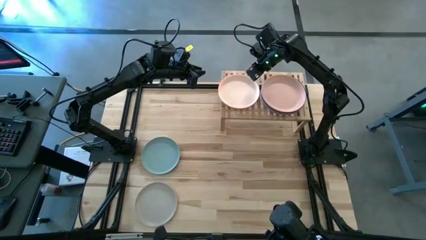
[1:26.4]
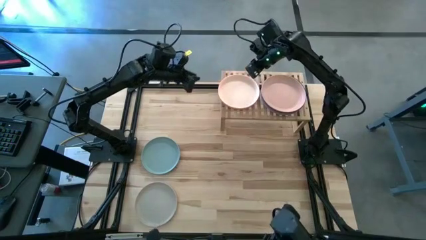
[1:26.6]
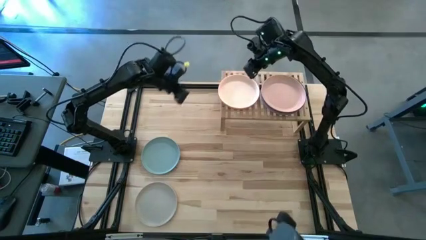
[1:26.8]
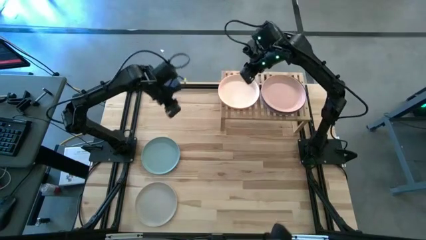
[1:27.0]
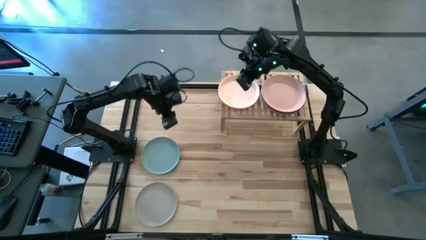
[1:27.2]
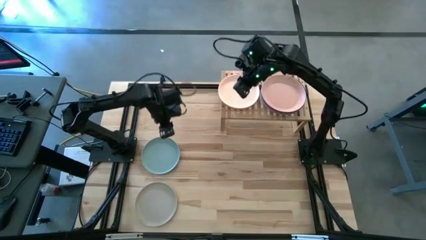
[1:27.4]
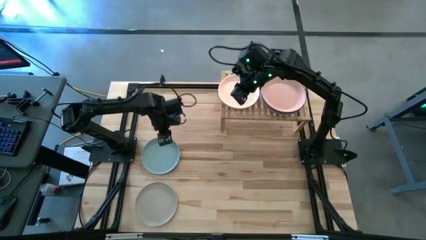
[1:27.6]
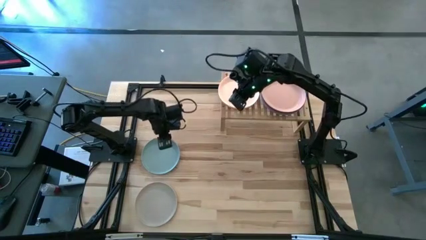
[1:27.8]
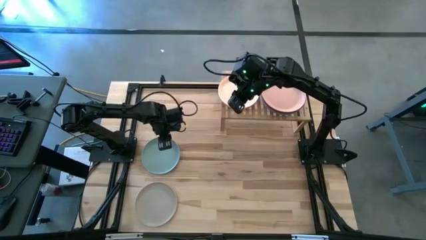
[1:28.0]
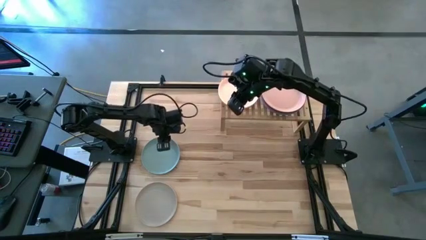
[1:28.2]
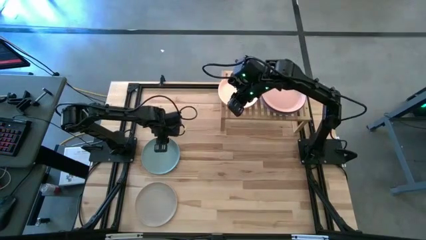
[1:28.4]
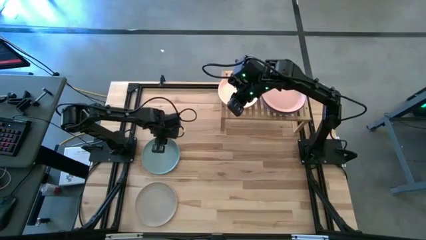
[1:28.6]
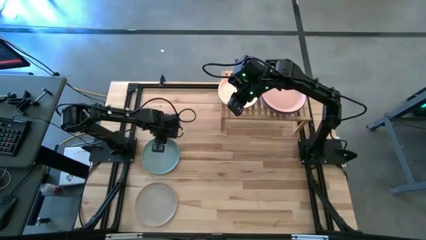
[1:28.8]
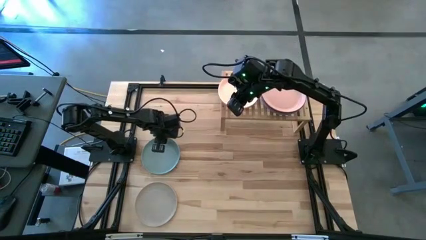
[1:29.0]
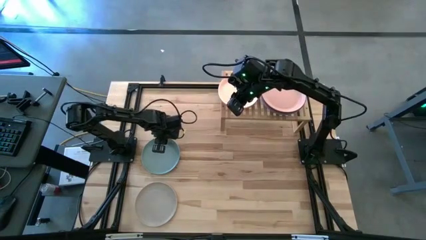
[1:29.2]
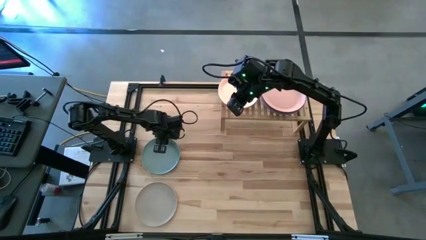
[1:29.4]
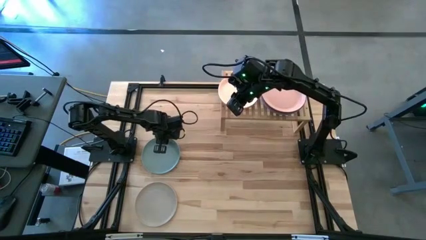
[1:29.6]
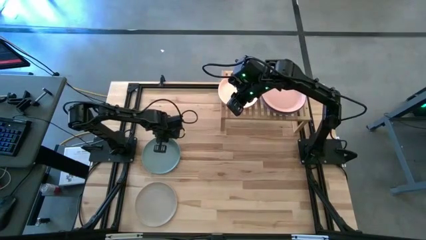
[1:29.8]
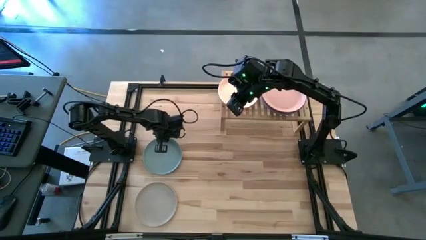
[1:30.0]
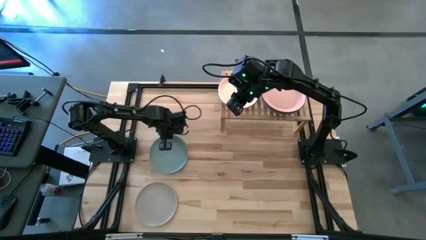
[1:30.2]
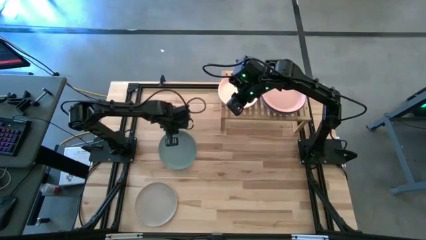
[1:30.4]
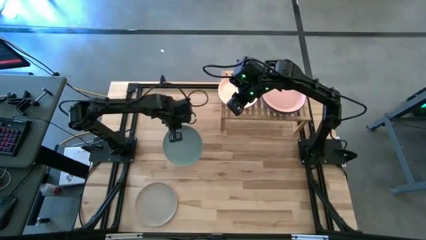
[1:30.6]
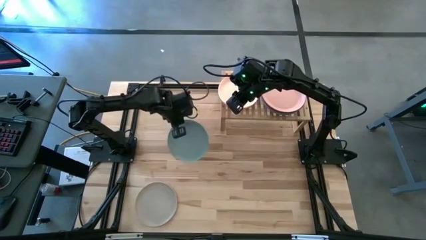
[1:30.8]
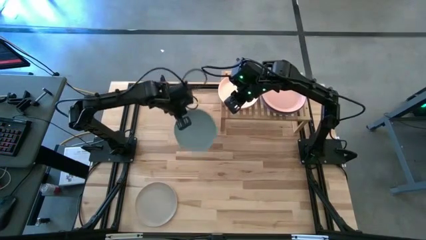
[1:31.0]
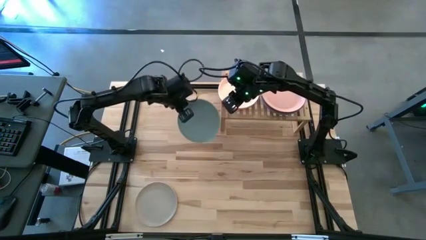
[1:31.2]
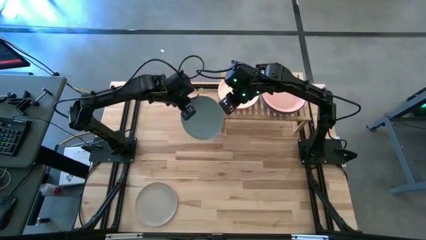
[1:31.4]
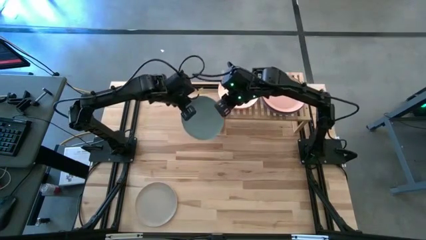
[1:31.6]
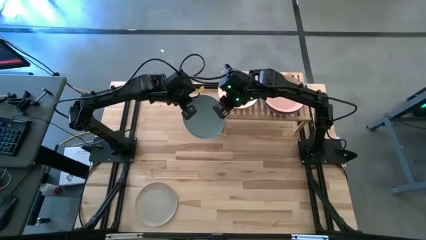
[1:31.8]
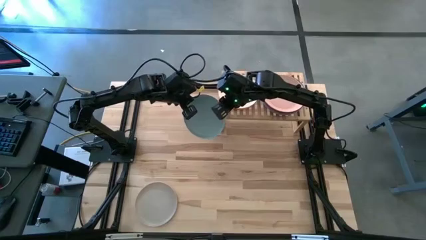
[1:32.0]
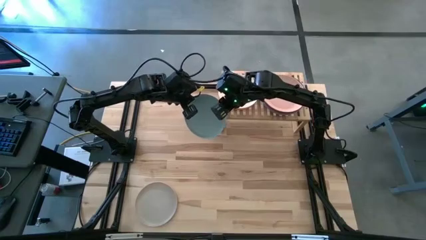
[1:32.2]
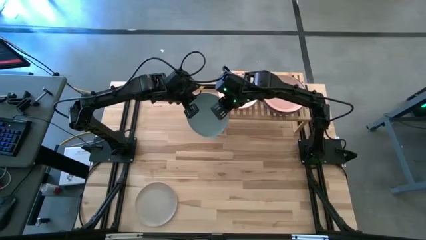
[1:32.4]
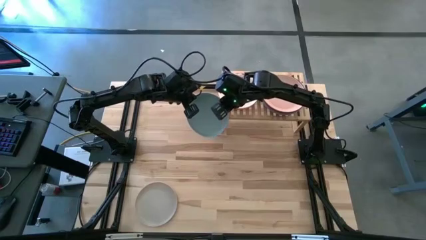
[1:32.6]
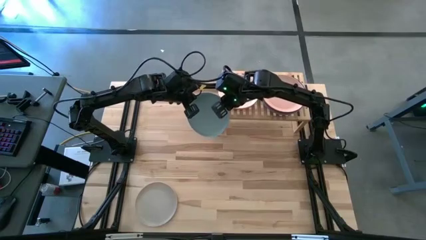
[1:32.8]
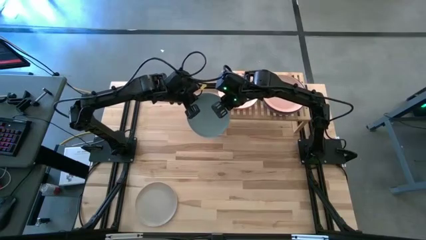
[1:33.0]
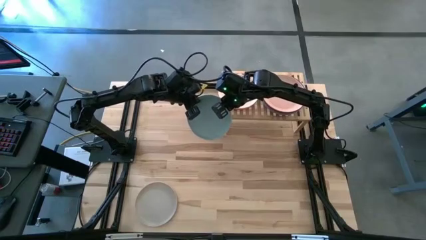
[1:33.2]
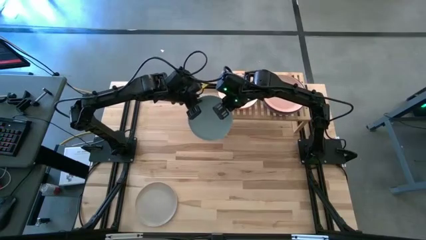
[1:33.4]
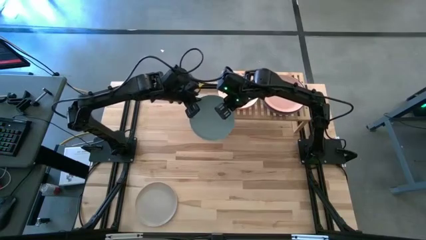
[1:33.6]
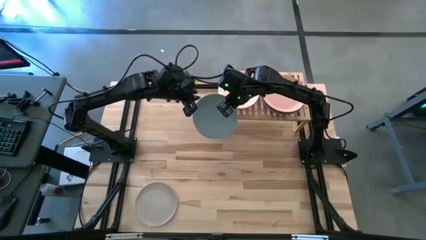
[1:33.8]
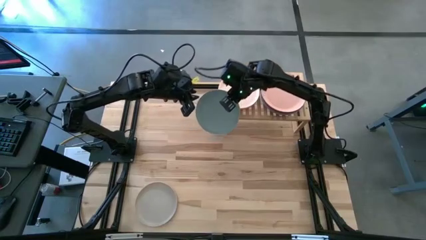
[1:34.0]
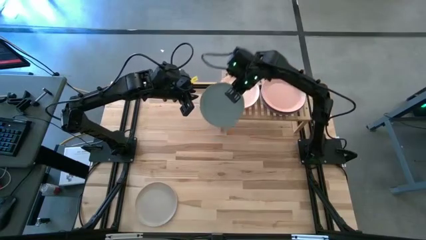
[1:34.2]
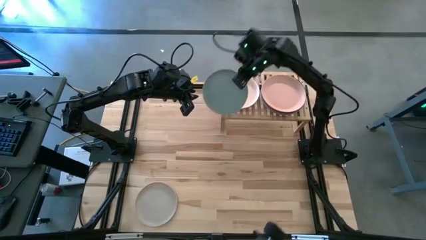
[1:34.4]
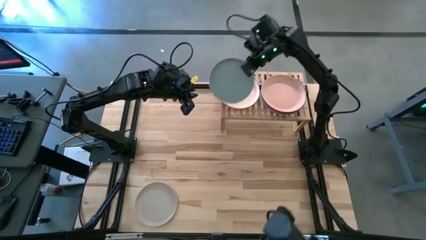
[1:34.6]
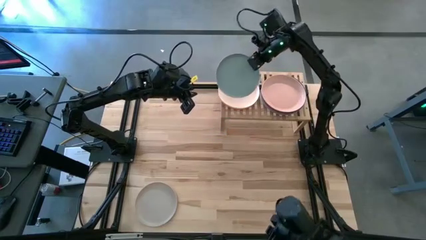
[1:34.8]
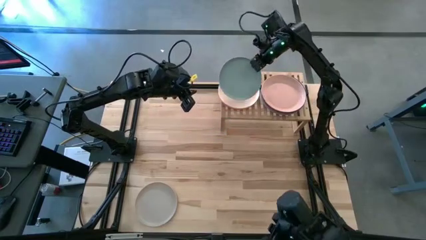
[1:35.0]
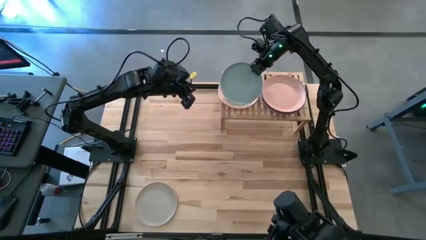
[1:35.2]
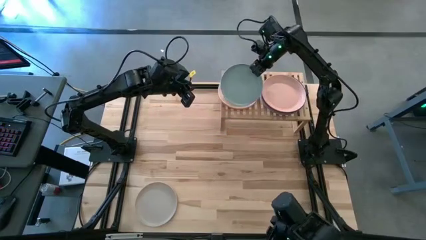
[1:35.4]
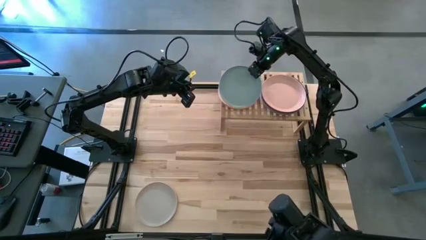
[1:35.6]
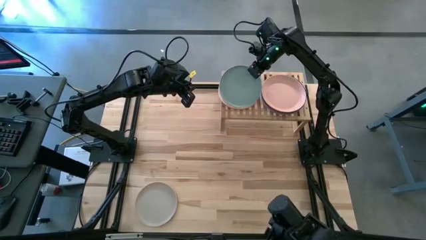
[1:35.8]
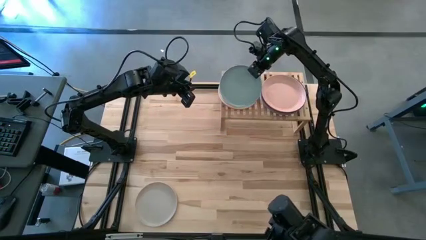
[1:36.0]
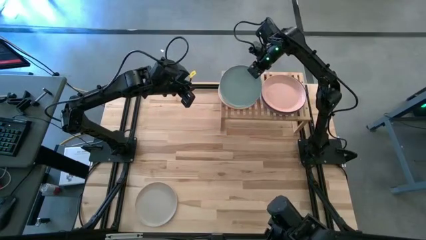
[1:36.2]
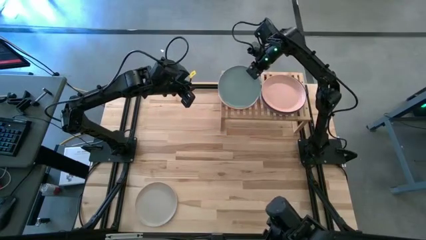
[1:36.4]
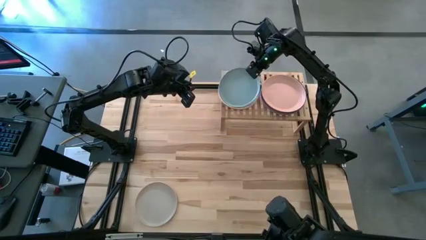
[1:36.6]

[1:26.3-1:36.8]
Task: Place and stack plates onto a shelf
Stack the light blue plate on the white plate on the shelf

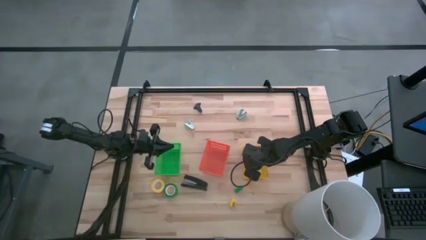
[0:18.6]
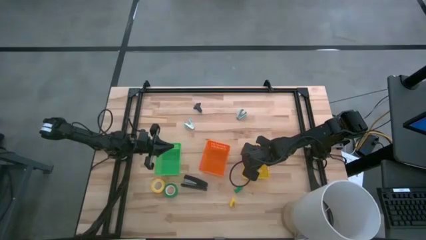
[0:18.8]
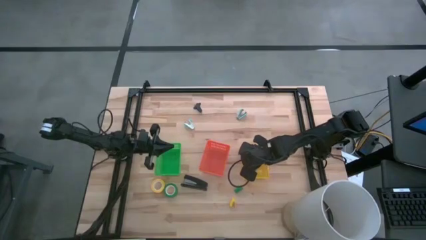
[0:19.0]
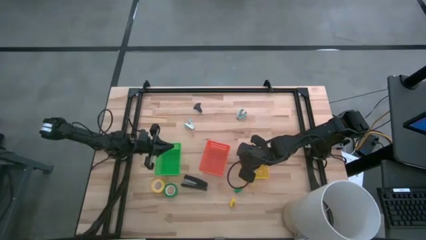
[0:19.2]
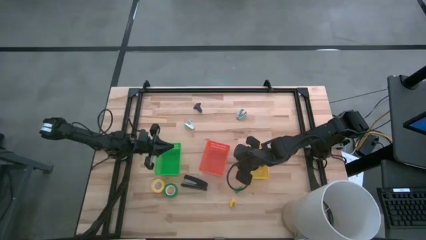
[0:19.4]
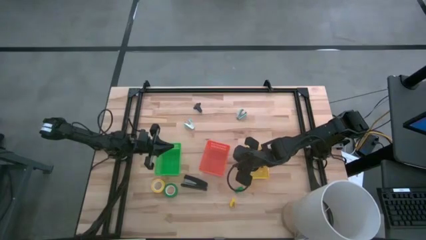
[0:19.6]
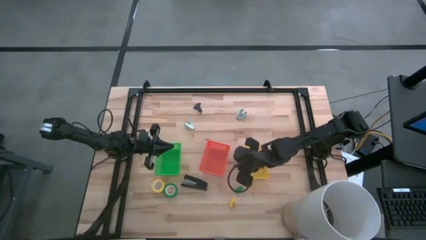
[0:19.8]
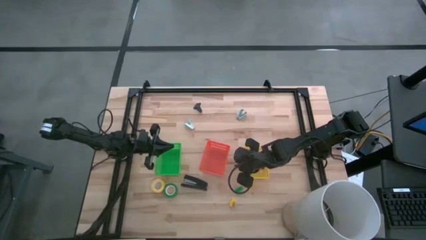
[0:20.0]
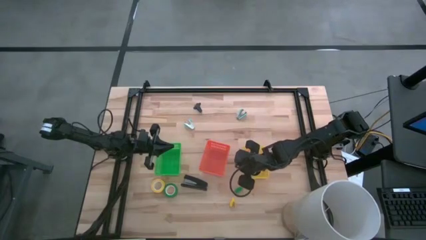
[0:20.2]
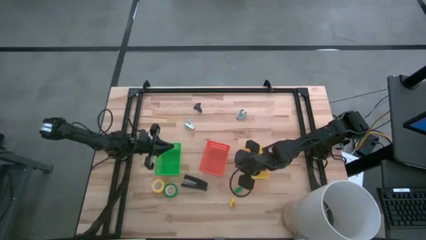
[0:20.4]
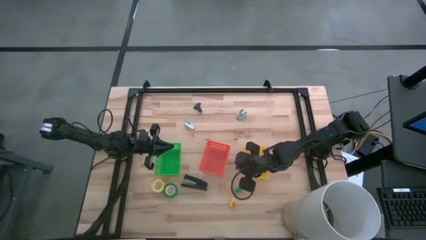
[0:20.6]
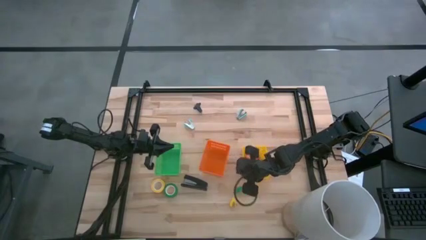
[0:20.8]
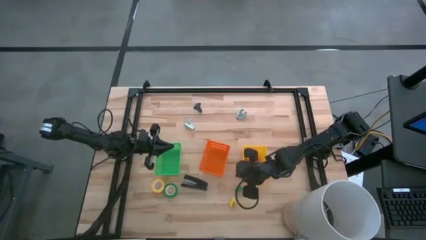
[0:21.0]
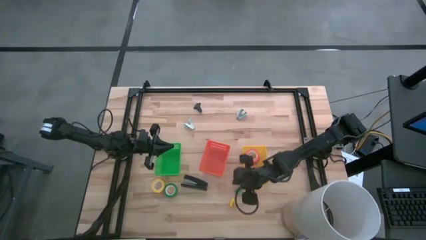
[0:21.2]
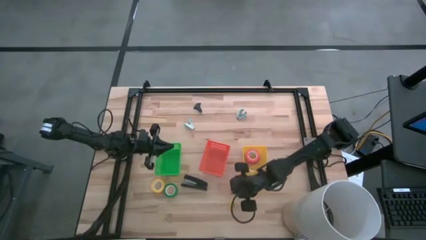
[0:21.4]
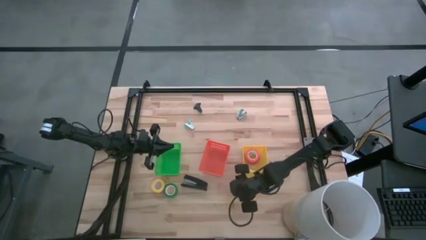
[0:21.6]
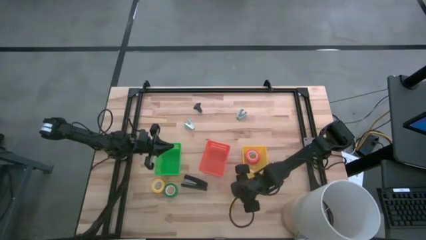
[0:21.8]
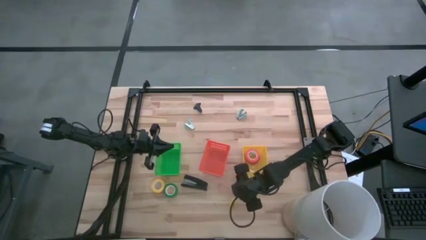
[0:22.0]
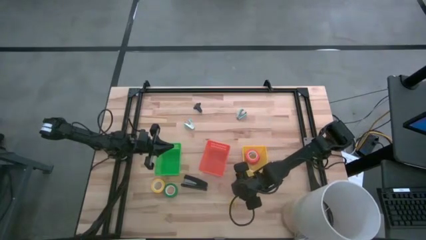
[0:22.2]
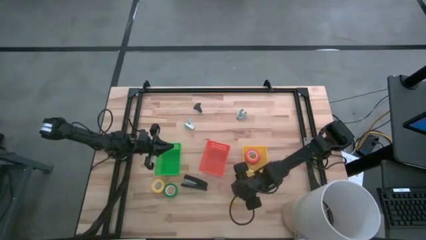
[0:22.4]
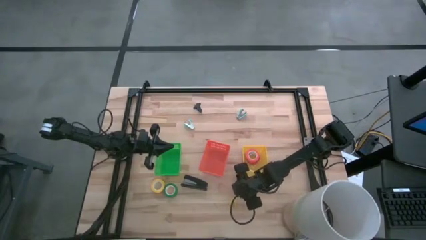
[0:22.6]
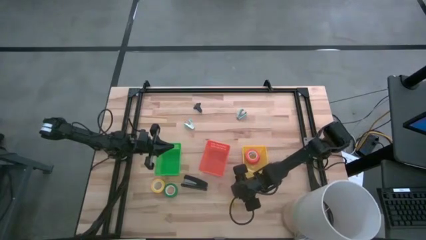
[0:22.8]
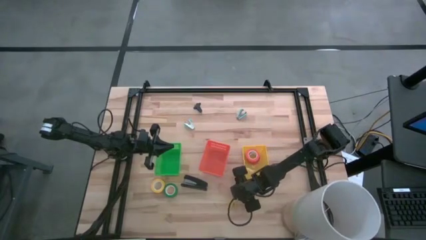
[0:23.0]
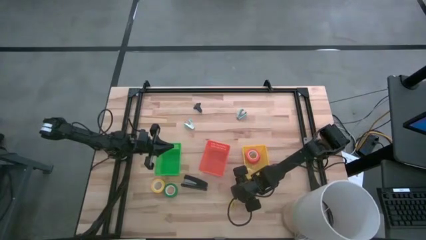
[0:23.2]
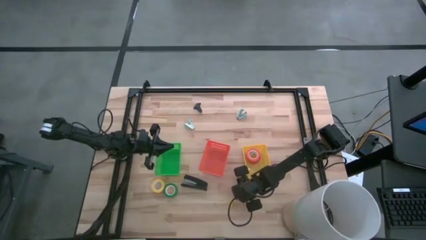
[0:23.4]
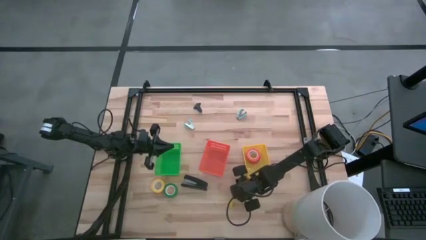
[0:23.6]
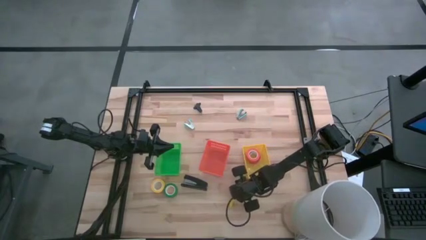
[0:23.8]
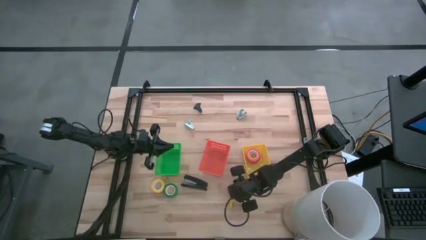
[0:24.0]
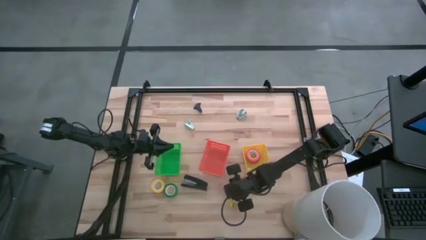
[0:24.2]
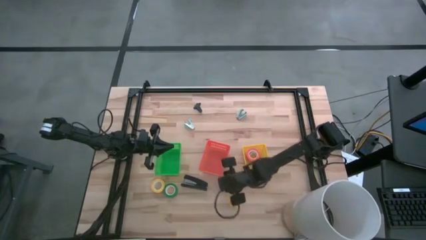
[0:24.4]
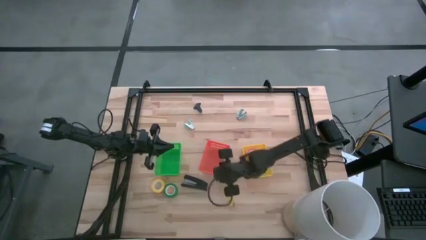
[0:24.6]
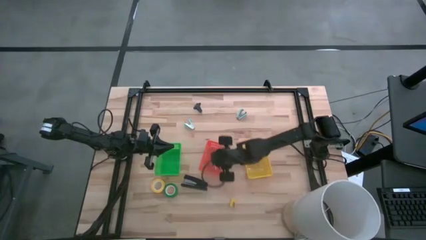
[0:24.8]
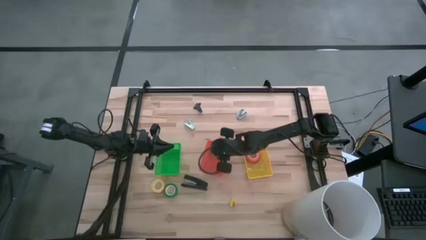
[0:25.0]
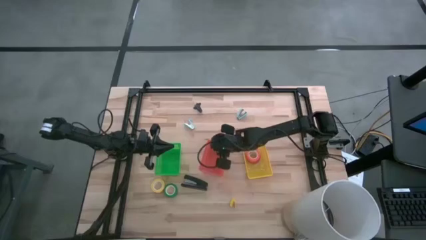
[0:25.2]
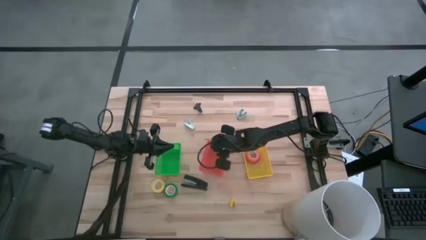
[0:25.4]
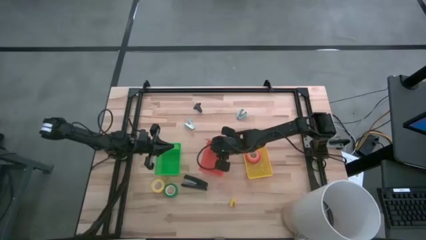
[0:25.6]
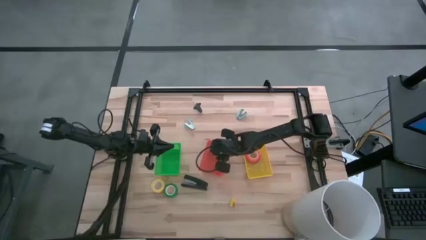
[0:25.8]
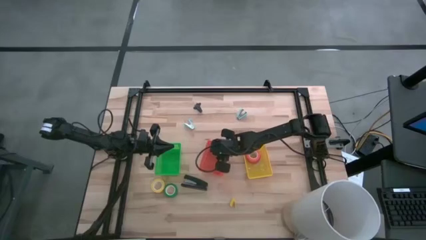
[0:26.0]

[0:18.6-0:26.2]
Task: Pick and place Stapler, Stapler remover, tape
Put the green stapler into the orange bin
